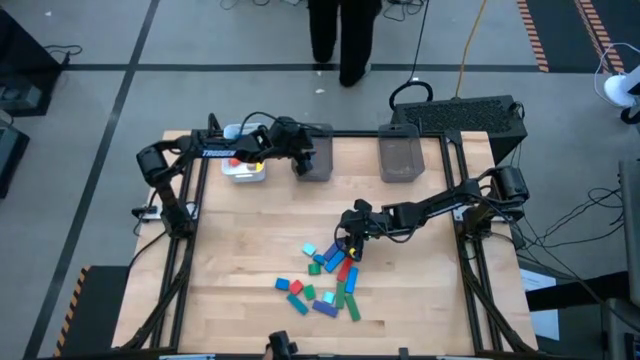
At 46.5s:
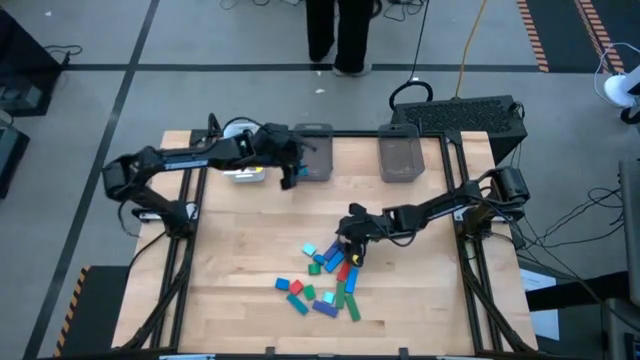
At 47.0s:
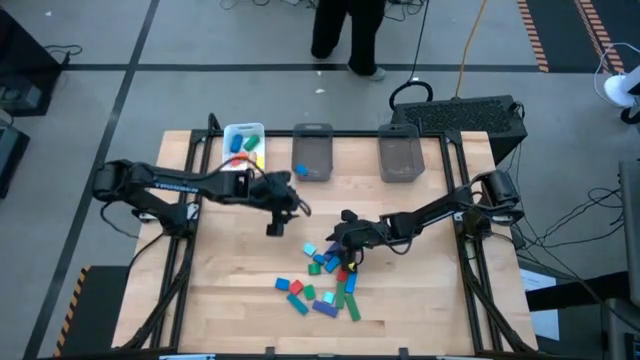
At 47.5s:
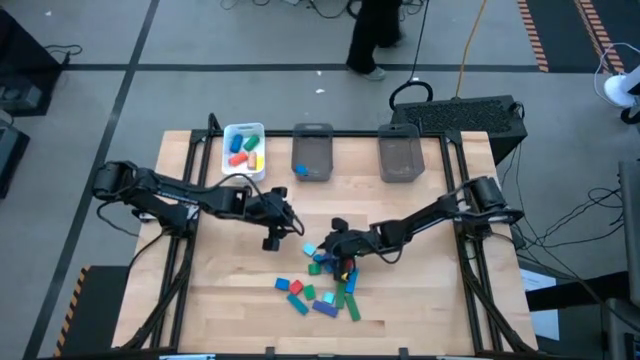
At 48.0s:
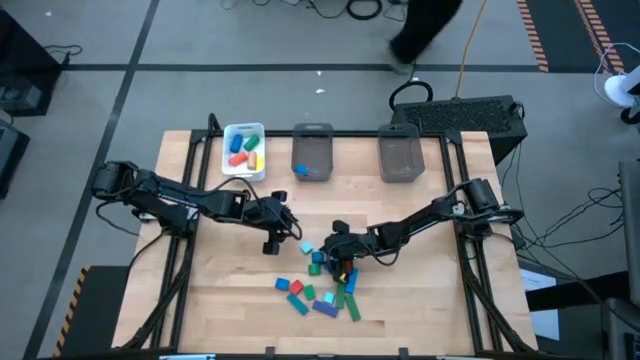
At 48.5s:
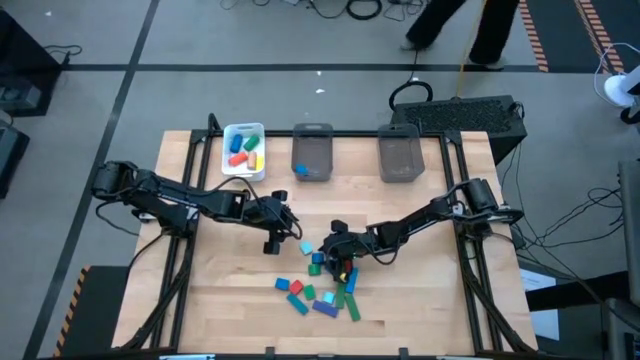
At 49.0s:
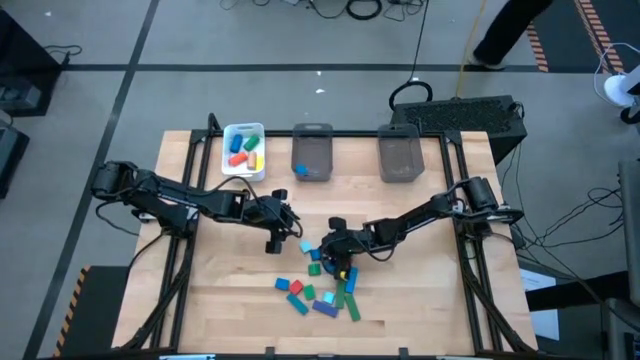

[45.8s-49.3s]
Task: Sort blocks by size
Put the blue half circle block into the left black bin

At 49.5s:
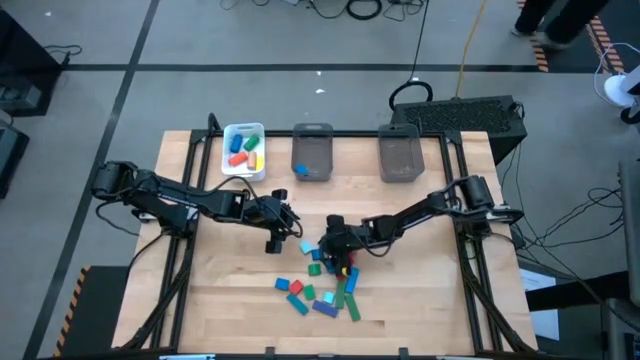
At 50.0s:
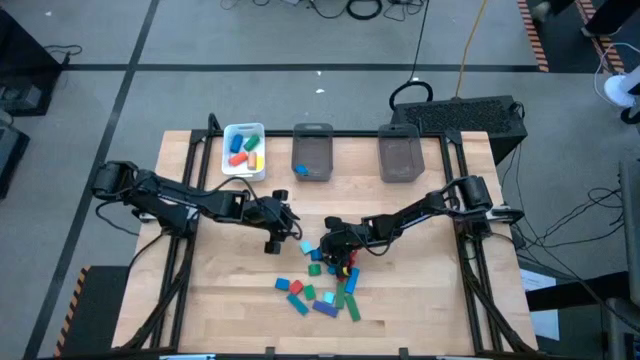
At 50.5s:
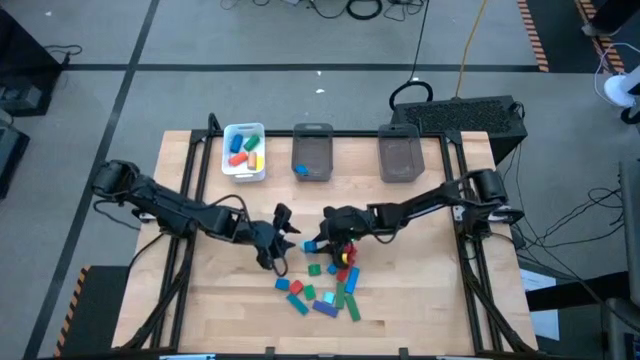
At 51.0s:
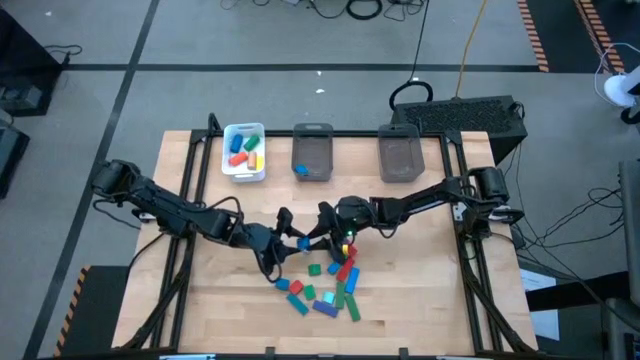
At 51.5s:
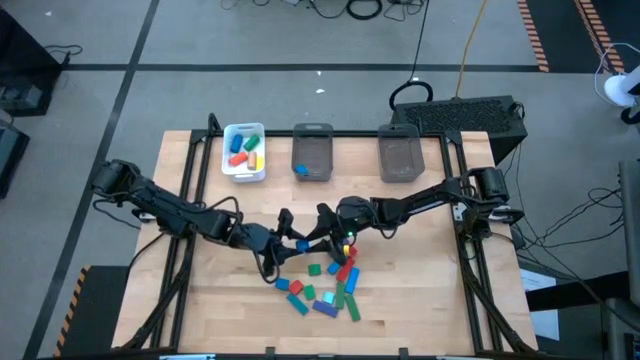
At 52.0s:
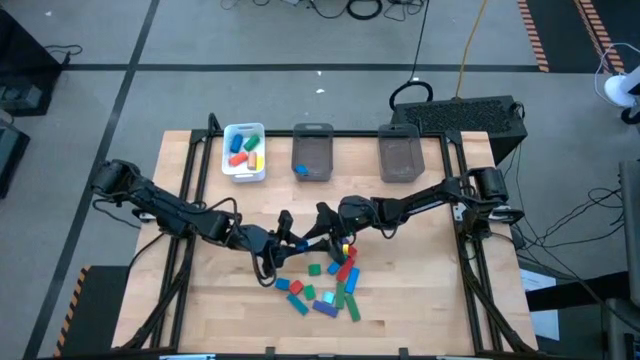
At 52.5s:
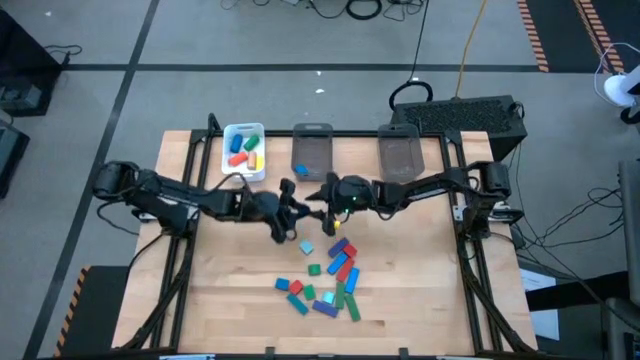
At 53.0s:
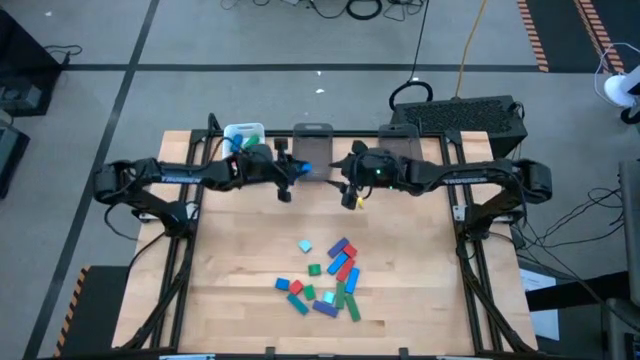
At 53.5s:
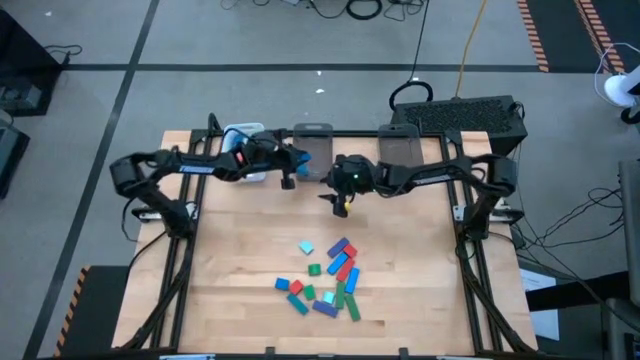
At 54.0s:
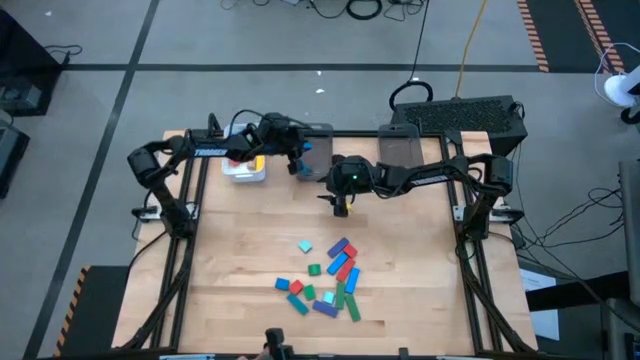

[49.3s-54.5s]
Put the blue half circle block into the left black bin

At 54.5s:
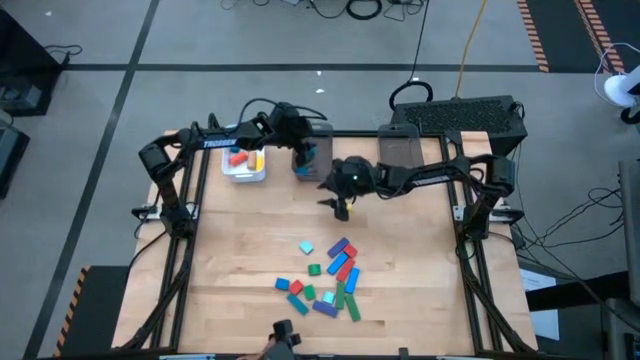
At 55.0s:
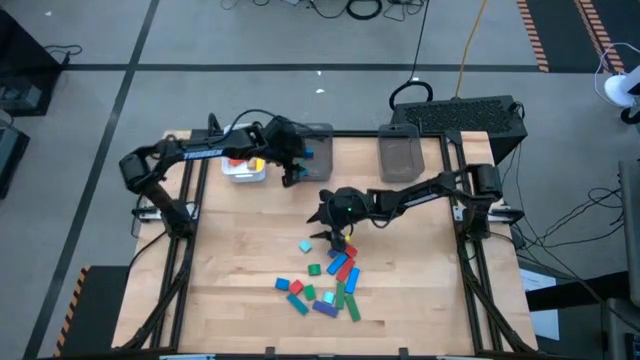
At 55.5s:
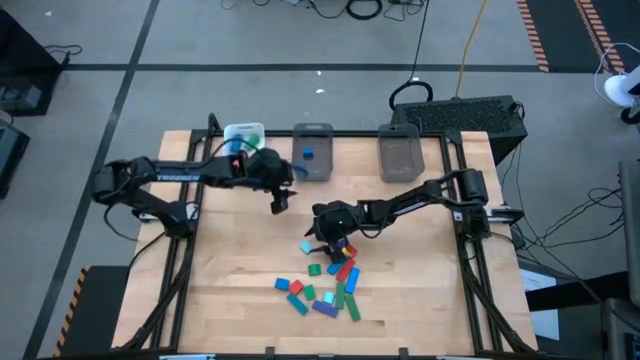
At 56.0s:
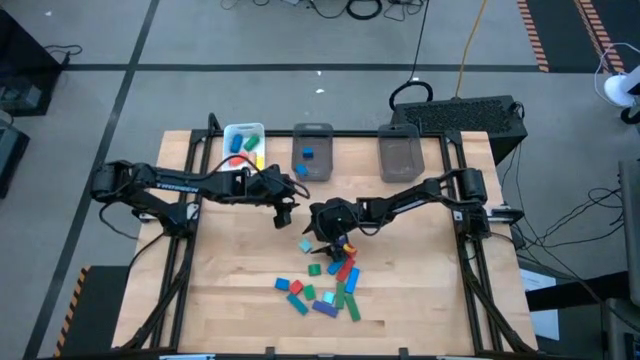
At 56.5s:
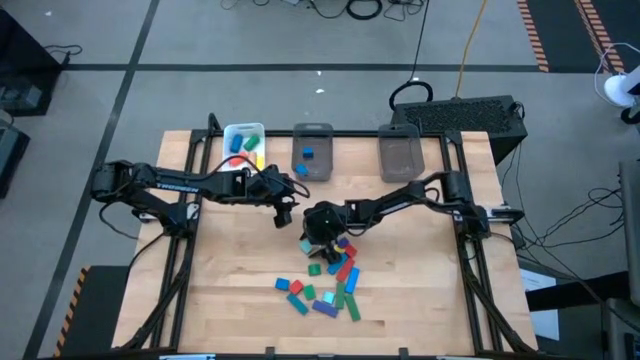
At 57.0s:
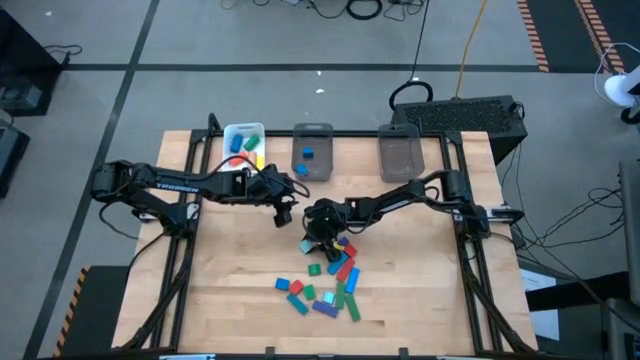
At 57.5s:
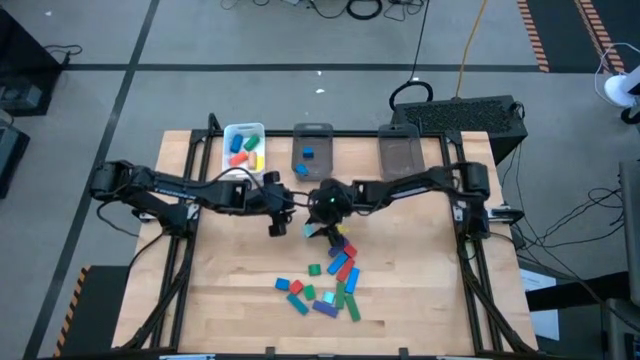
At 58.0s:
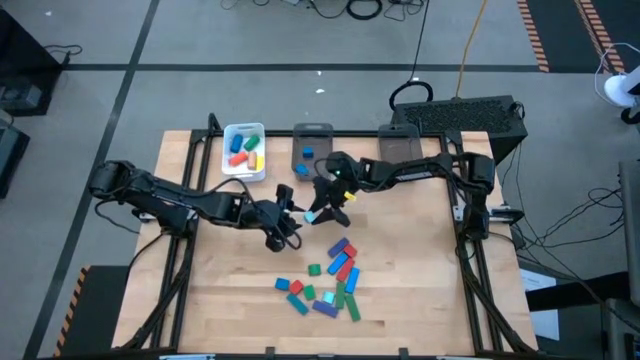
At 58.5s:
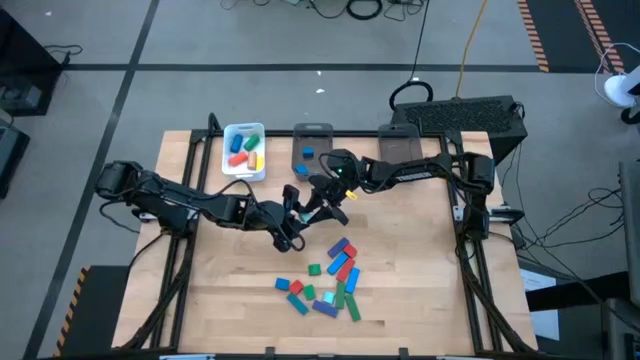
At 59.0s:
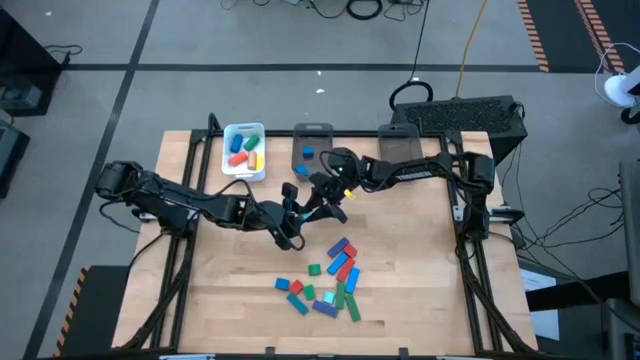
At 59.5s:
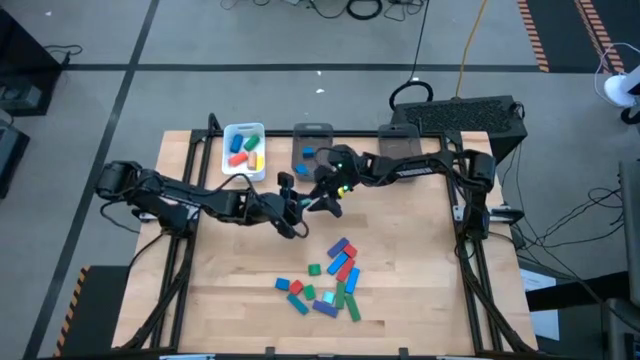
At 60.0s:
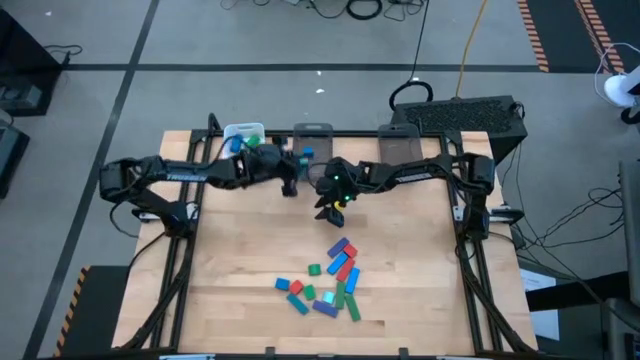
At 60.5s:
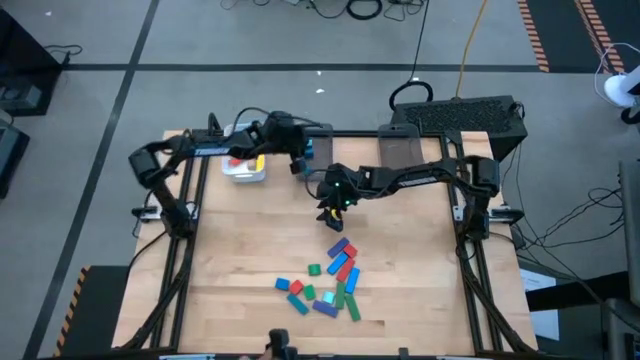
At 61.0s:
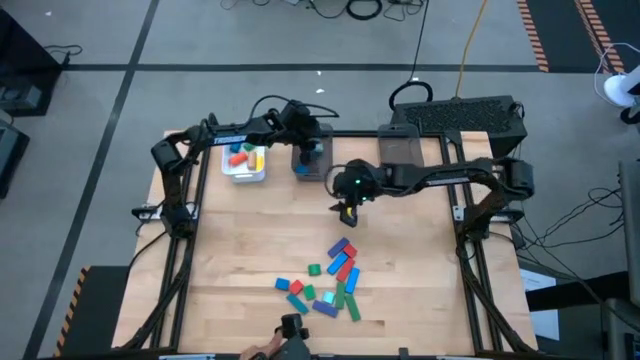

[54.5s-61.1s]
Put the light blue half circle block into the left black bin

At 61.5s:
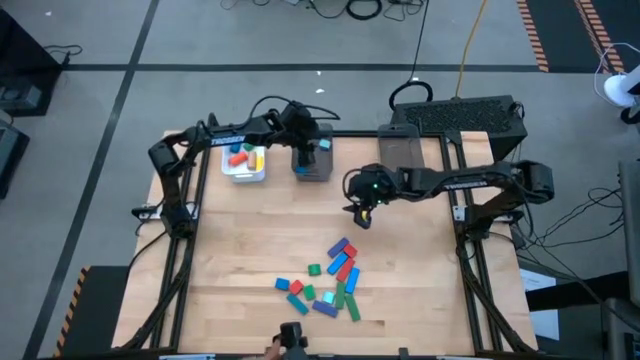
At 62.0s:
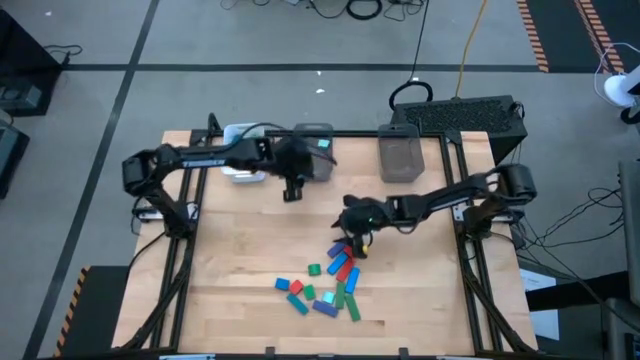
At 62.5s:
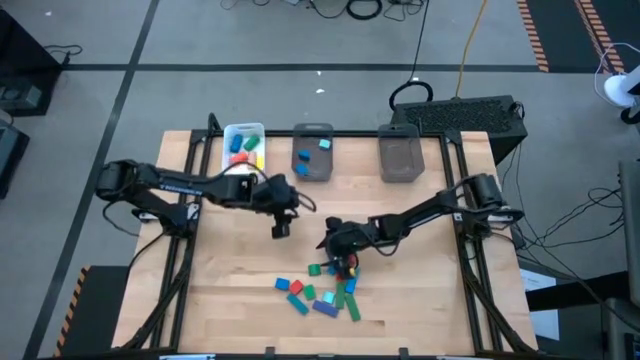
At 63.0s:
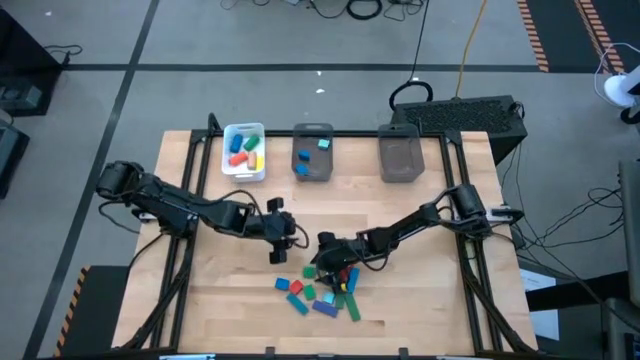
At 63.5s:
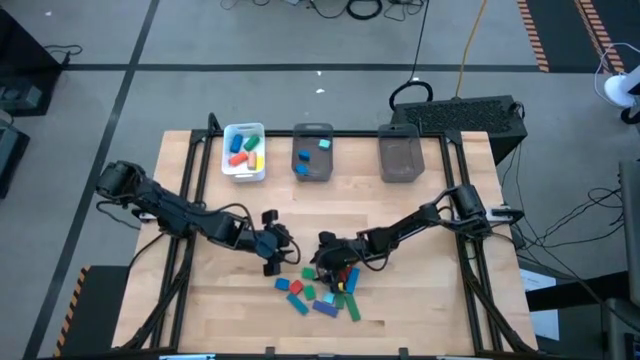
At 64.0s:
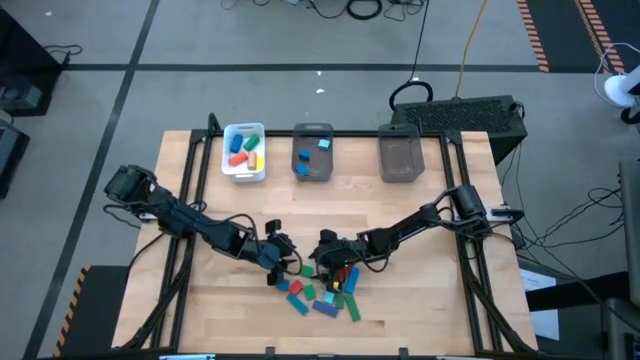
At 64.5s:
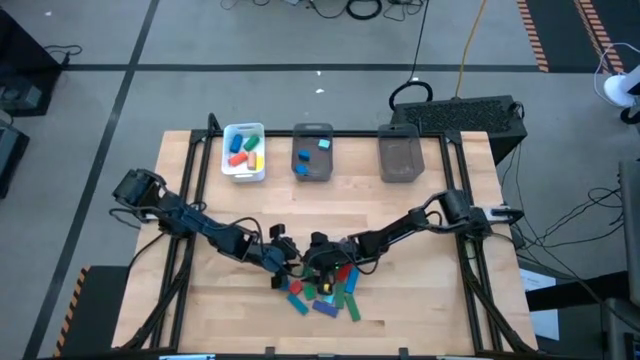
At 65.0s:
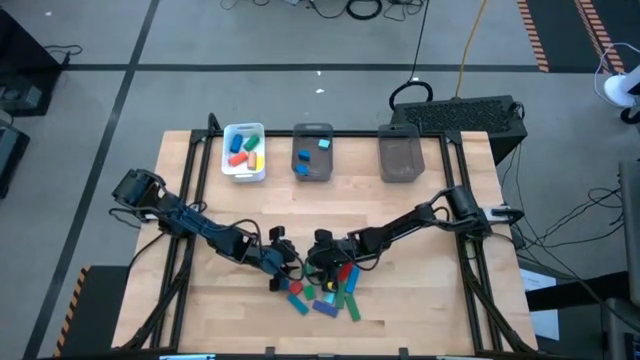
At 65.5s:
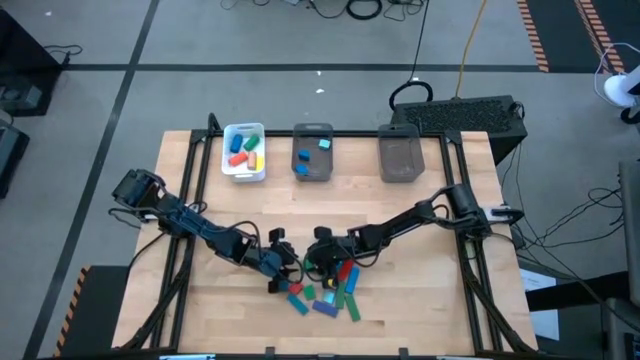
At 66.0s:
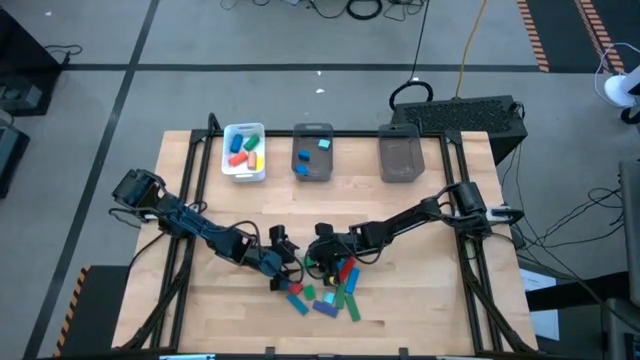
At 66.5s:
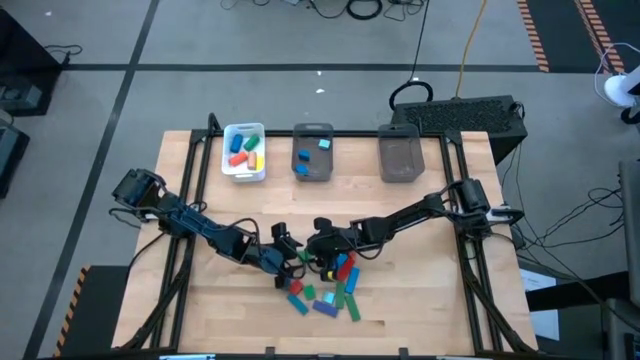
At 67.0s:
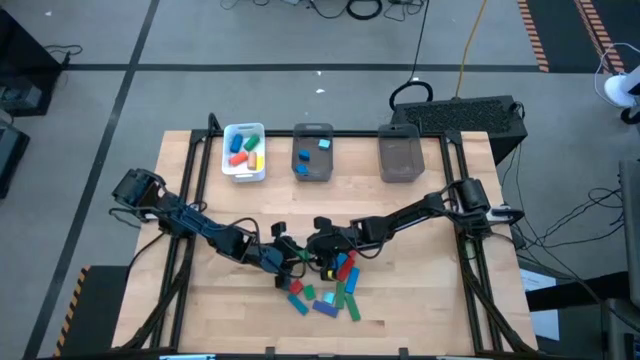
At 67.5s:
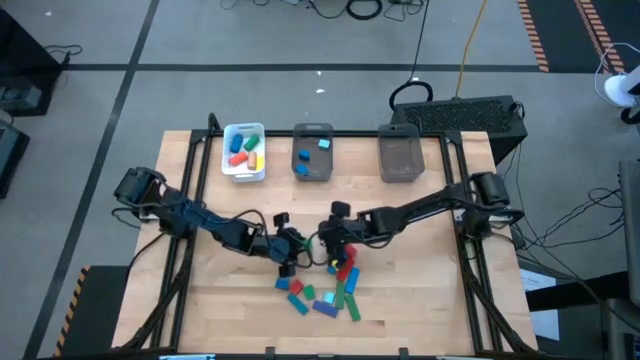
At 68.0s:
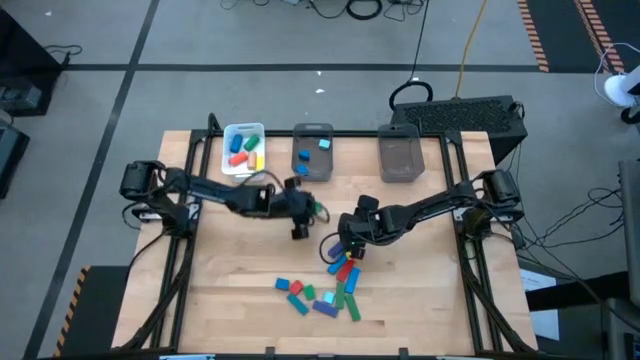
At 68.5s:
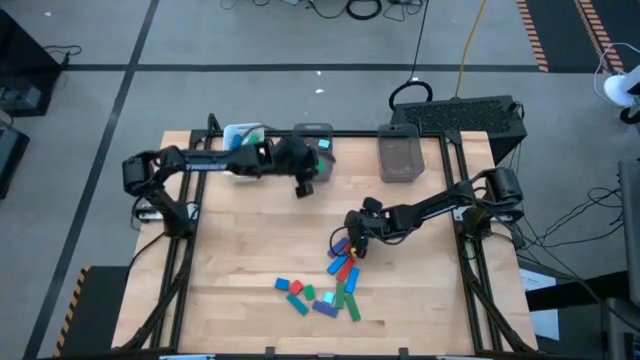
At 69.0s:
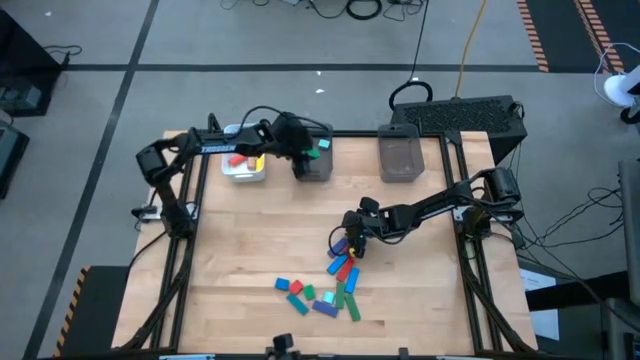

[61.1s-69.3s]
Put the green half circle block into the left black bin
